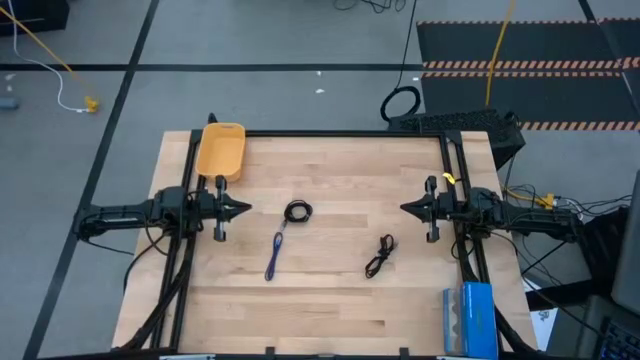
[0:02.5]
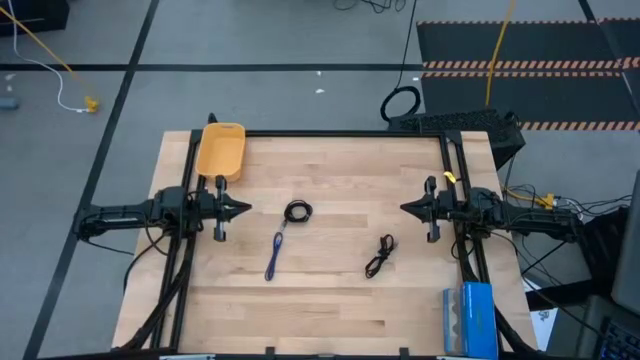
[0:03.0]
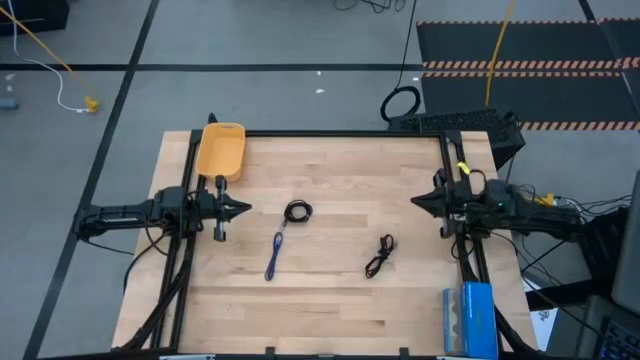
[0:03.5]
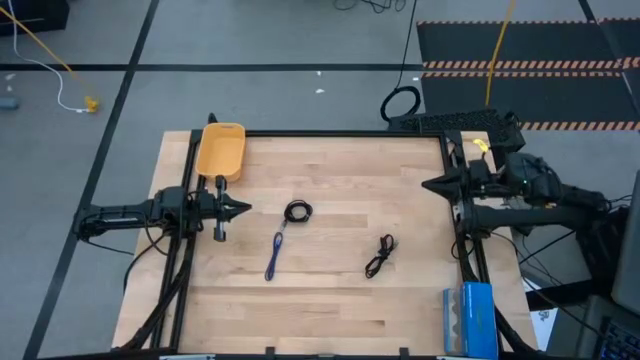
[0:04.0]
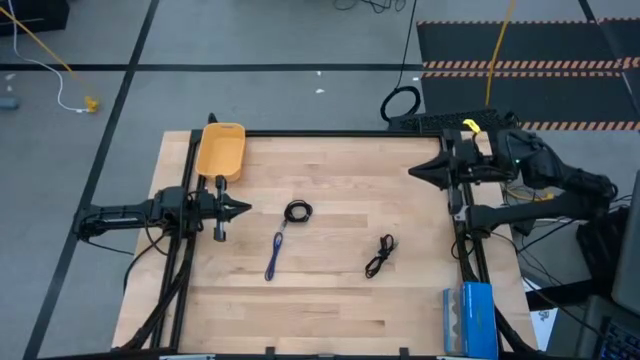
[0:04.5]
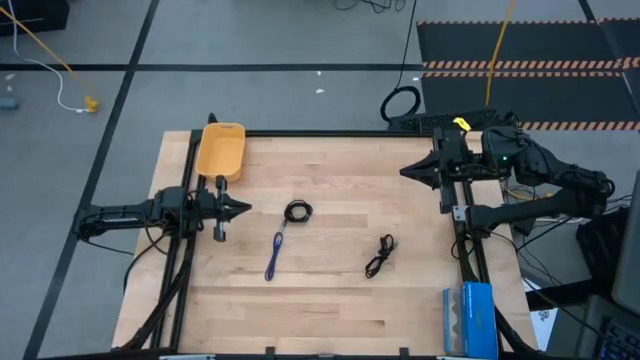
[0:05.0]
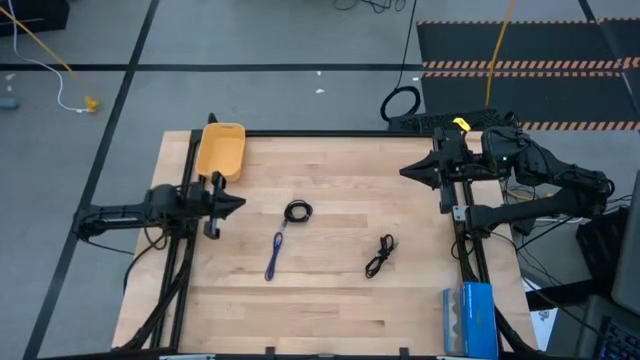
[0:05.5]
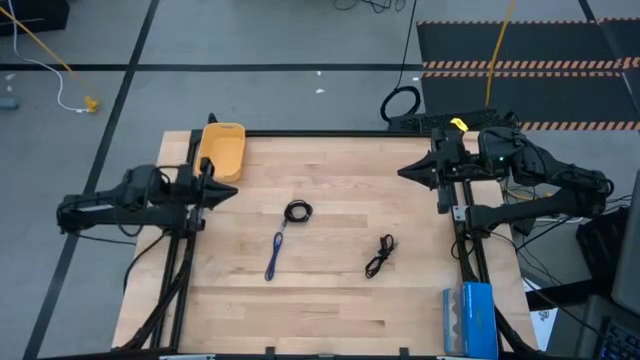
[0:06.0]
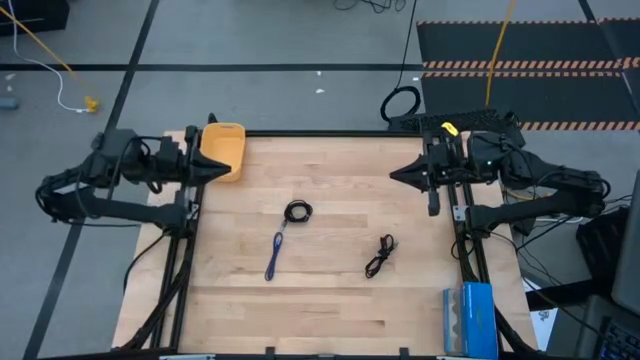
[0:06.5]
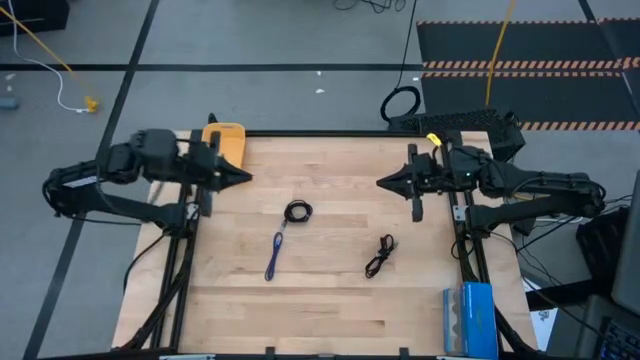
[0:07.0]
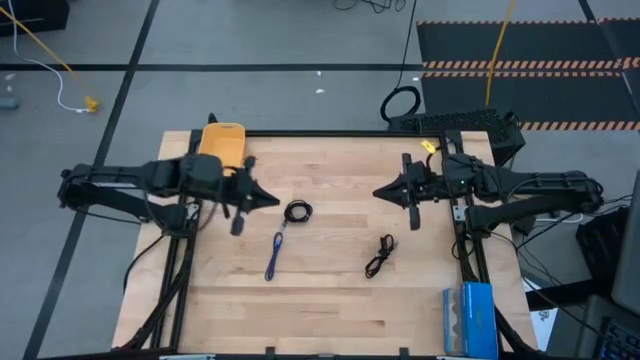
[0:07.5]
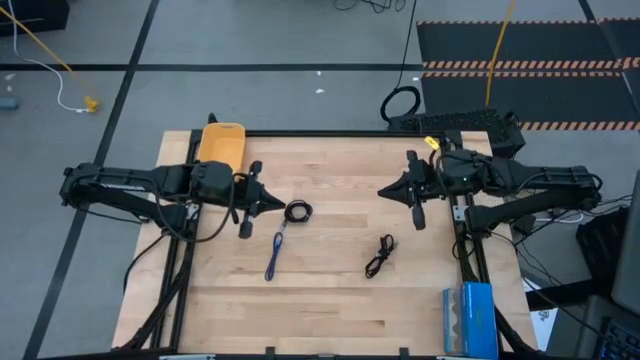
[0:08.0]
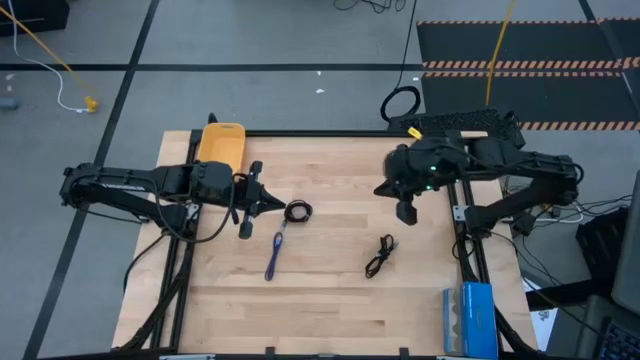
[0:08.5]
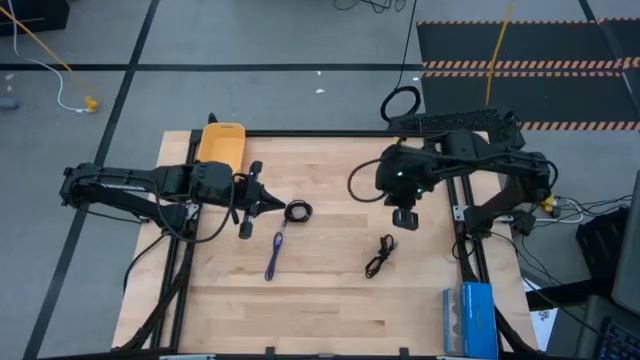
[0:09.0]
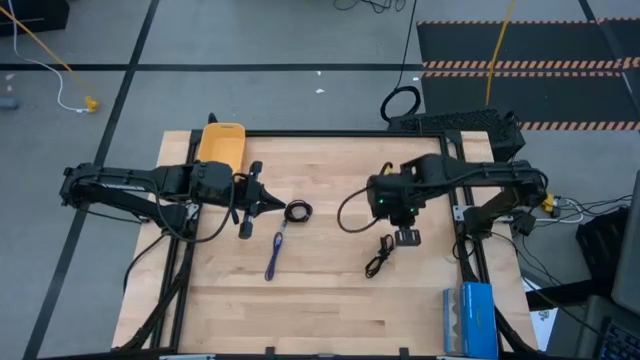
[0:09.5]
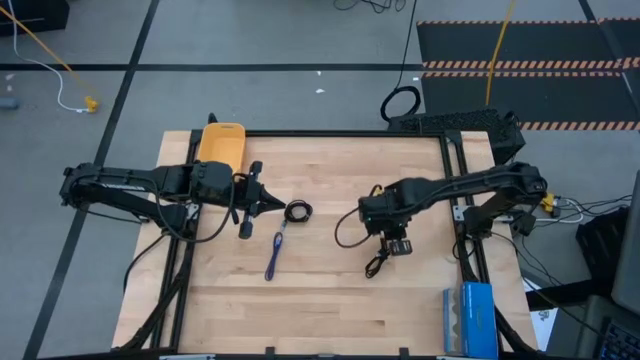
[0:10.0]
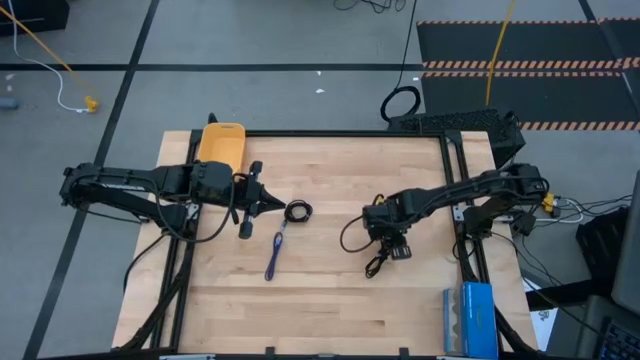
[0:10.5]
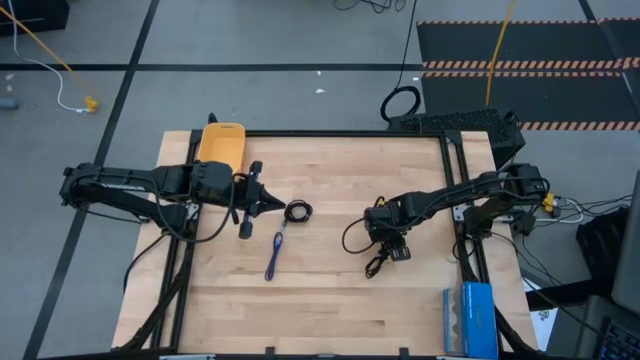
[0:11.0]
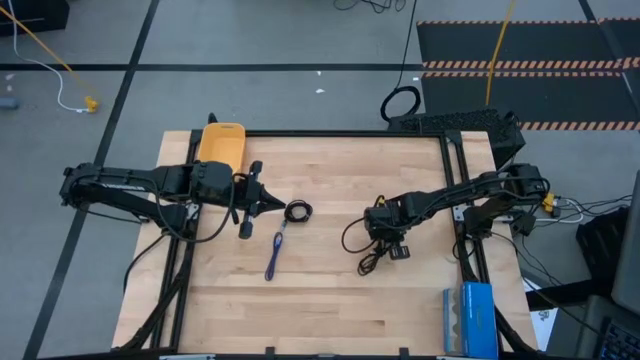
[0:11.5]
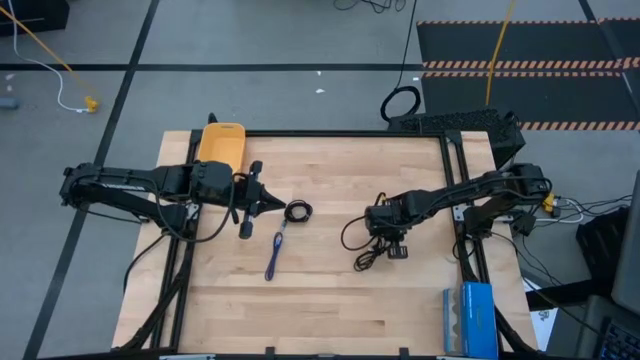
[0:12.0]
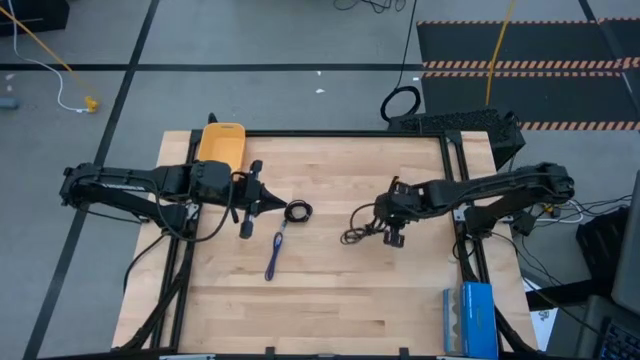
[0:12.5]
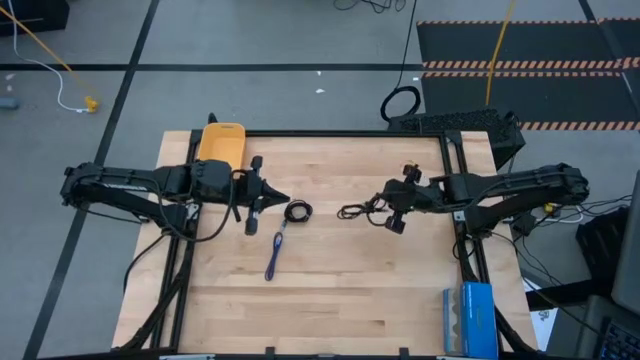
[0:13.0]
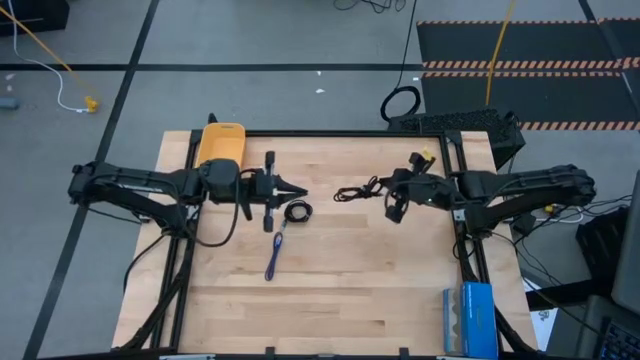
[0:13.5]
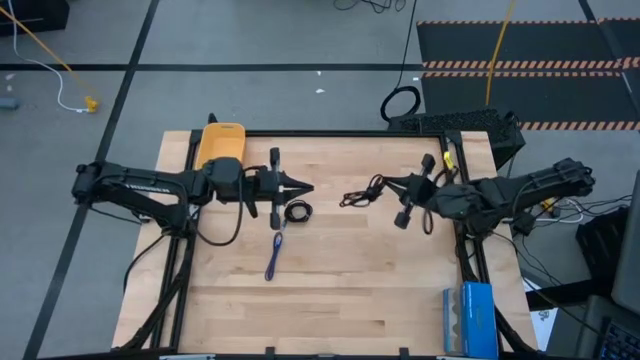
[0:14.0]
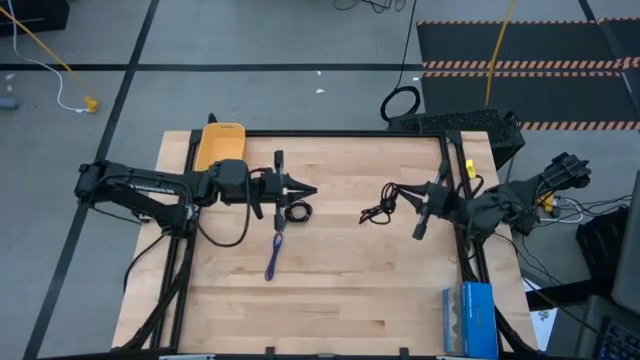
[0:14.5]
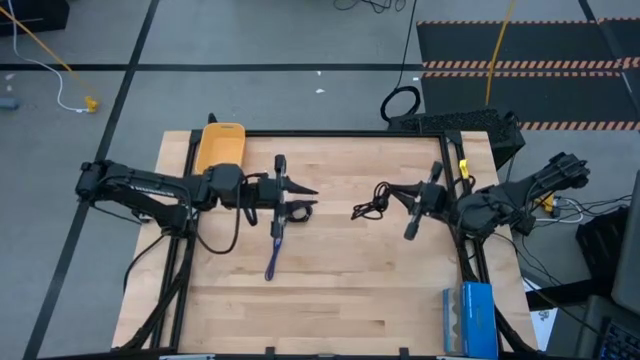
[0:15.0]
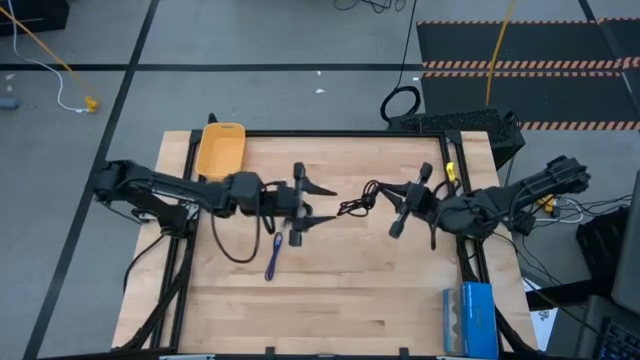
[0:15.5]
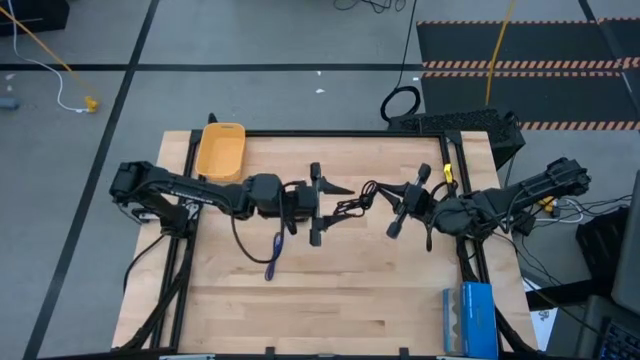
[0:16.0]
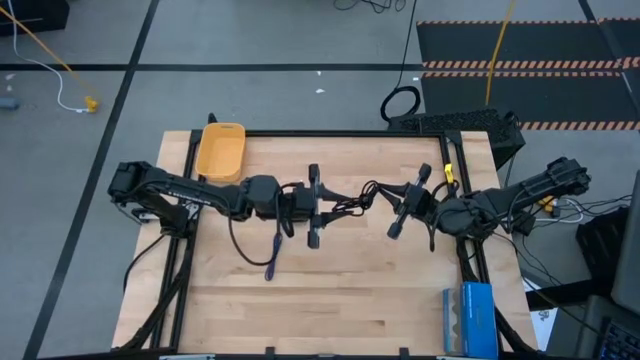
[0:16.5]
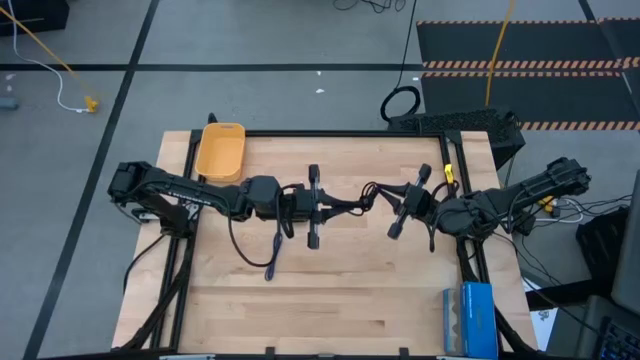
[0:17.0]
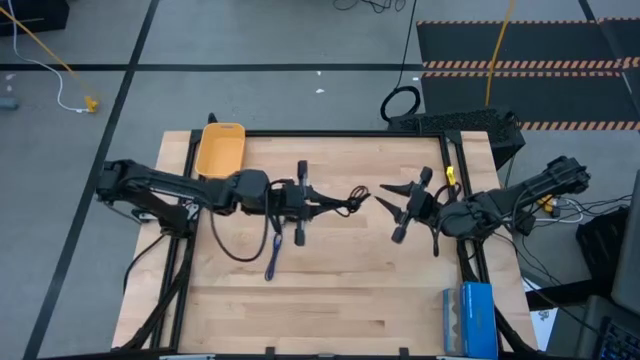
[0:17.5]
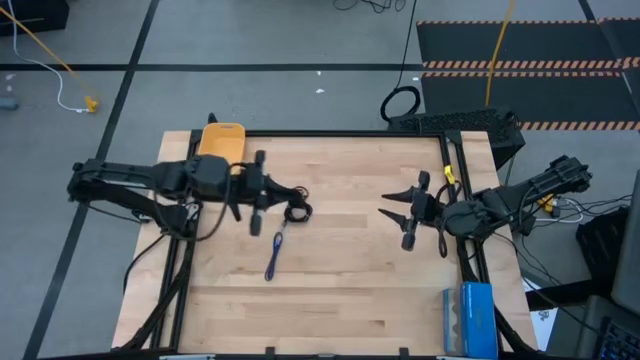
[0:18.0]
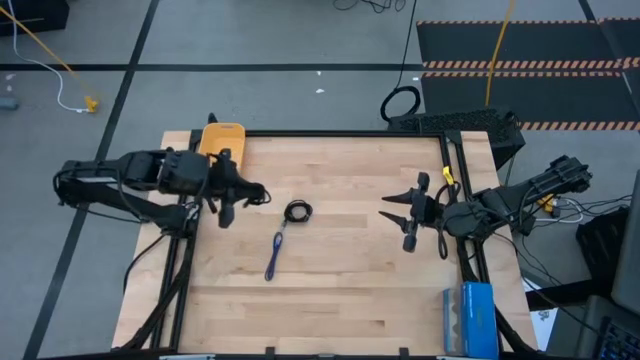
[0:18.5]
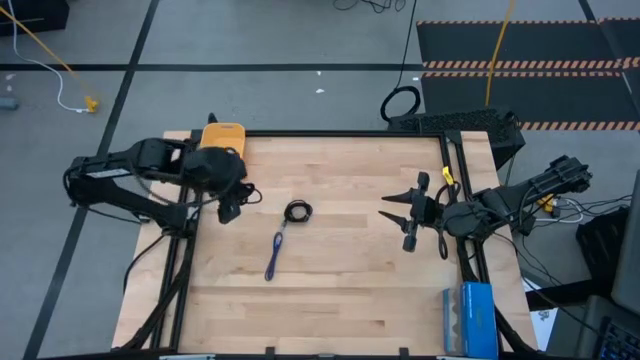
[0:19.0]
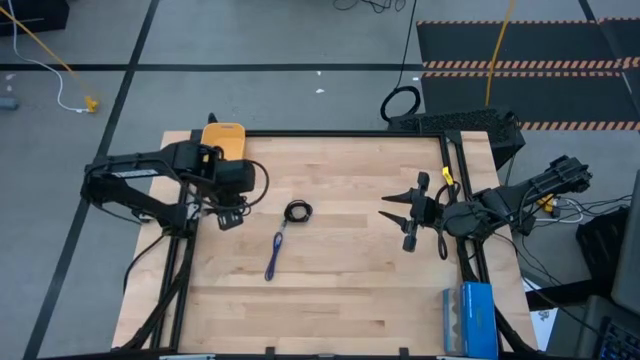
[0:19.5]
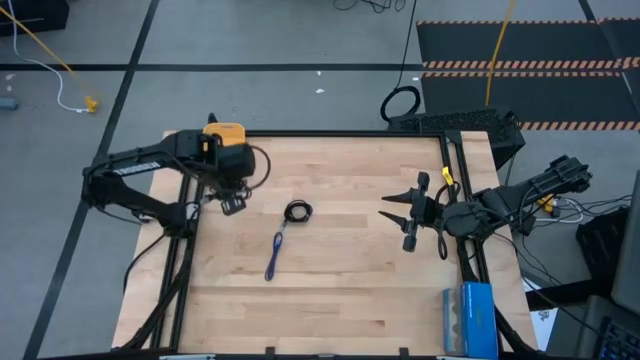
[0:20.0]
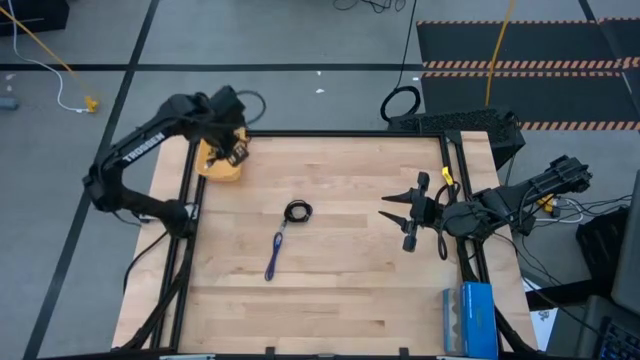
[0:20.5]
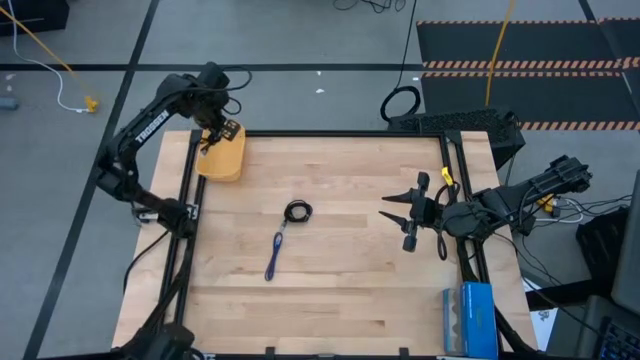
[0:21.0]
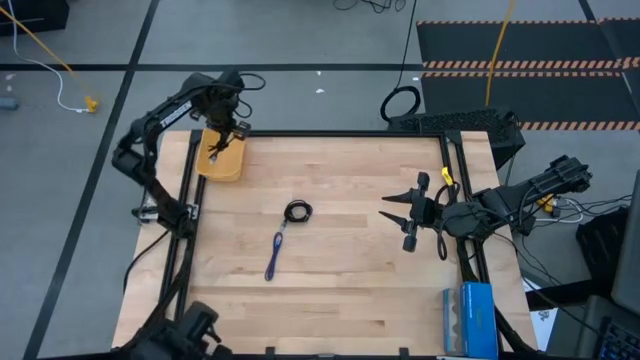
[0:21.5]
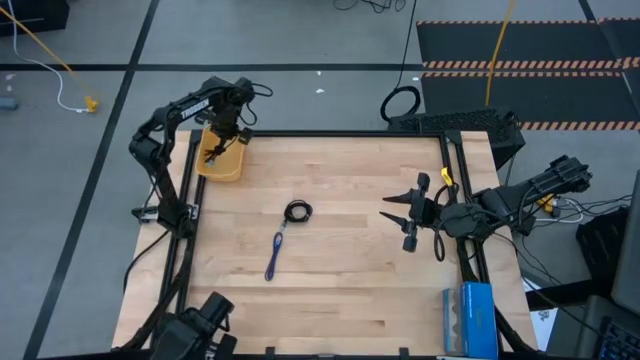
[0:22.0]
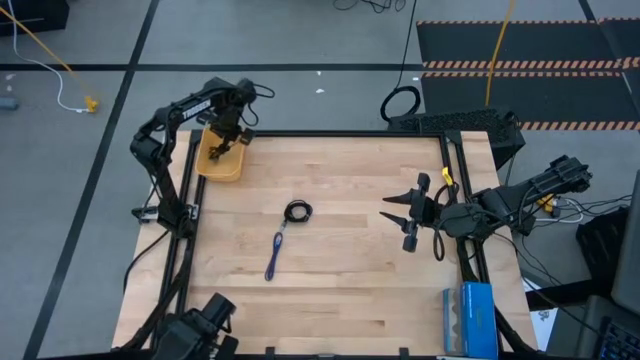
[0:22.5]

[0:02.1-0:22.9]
Task: Pick and place USB-C Cables
Put the right black charger cable into the yellow bin
